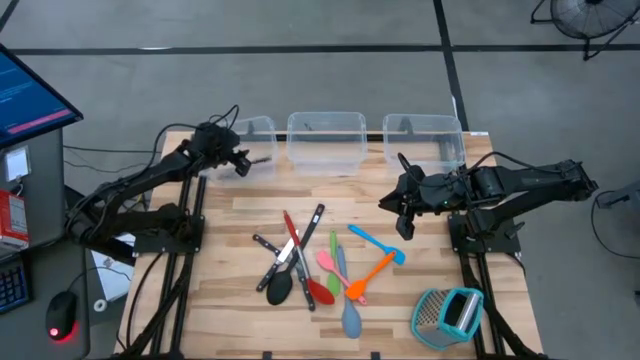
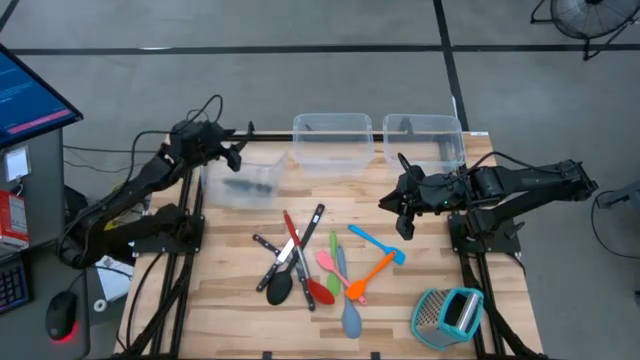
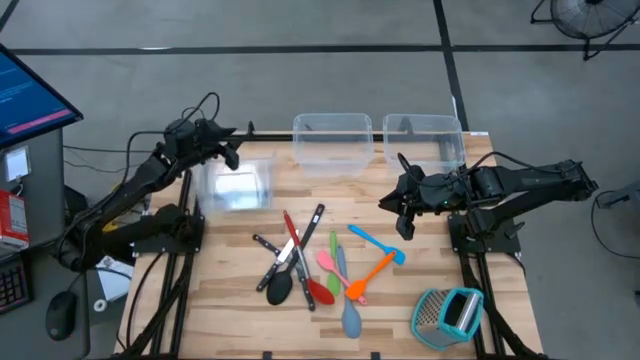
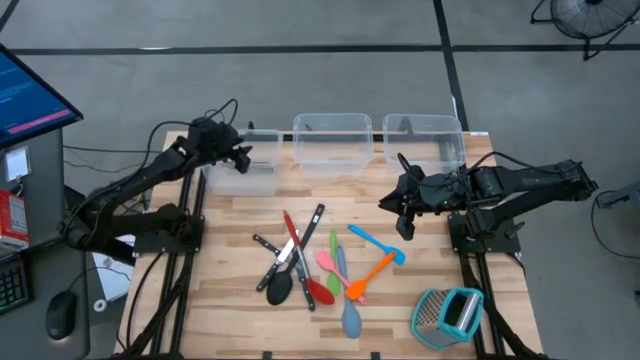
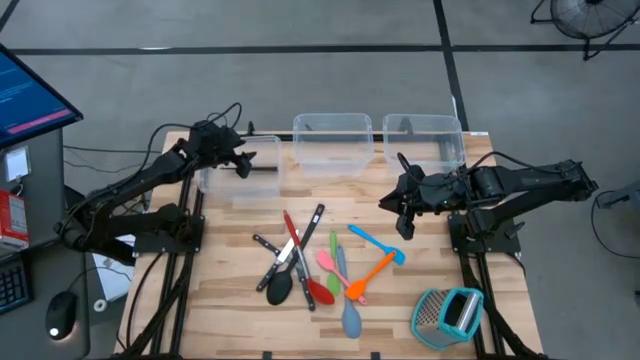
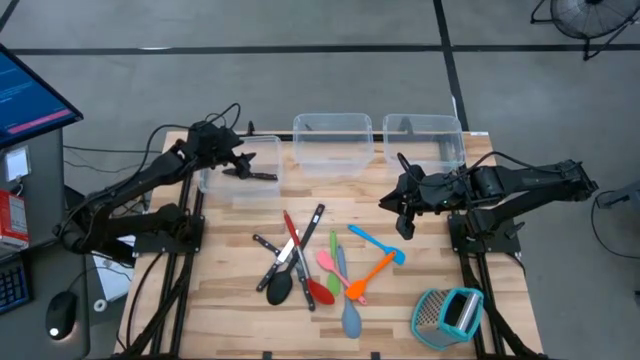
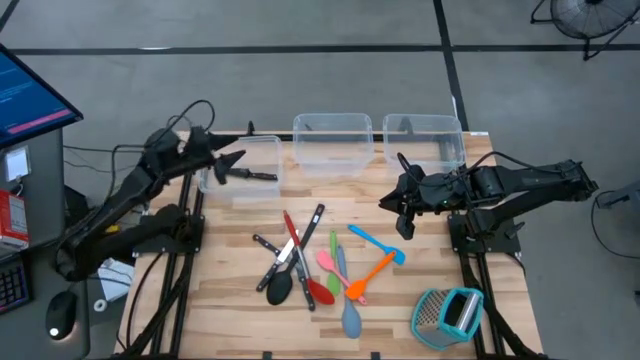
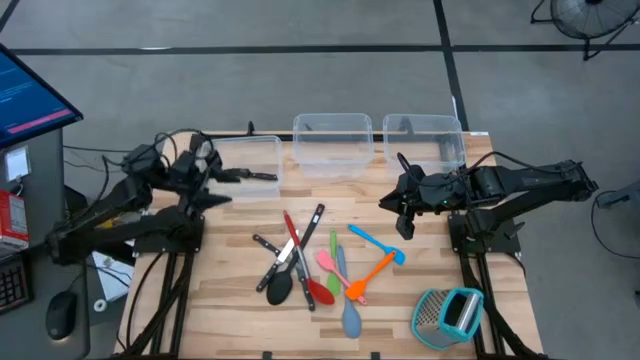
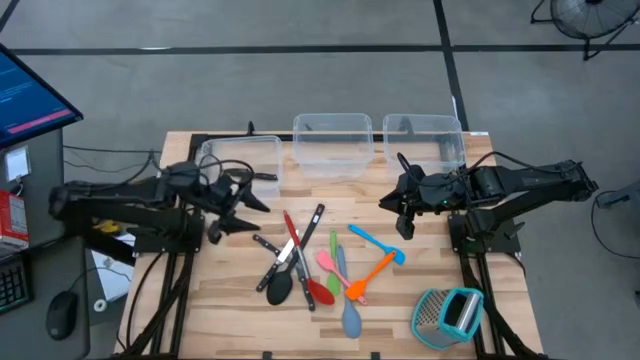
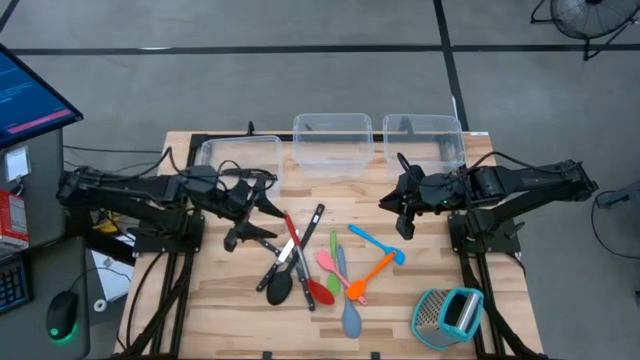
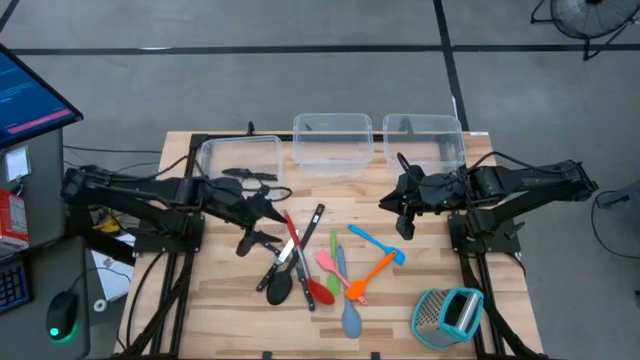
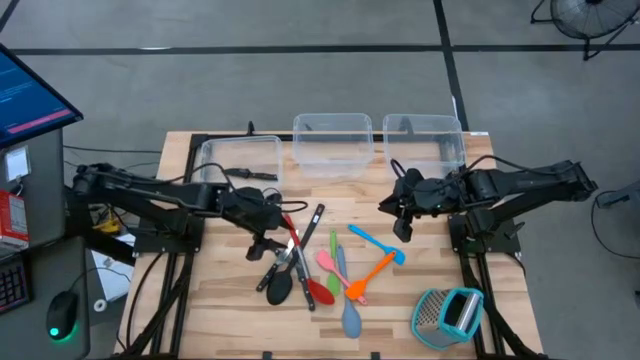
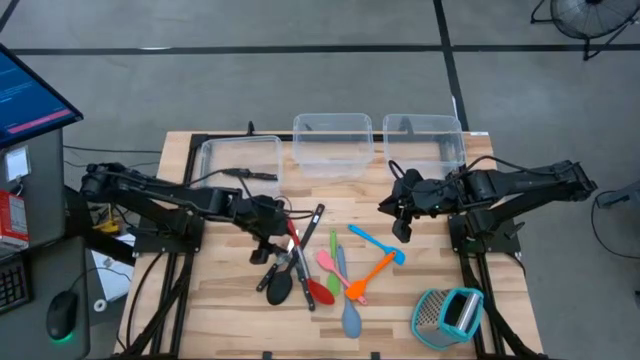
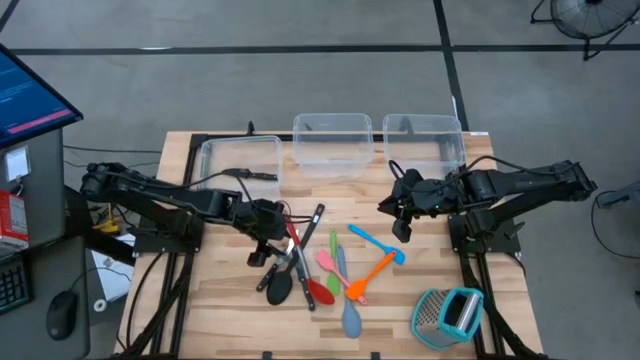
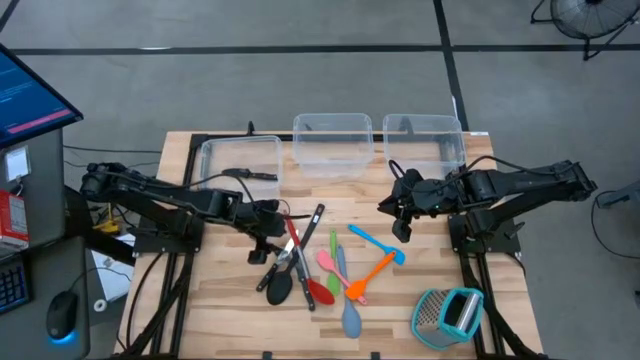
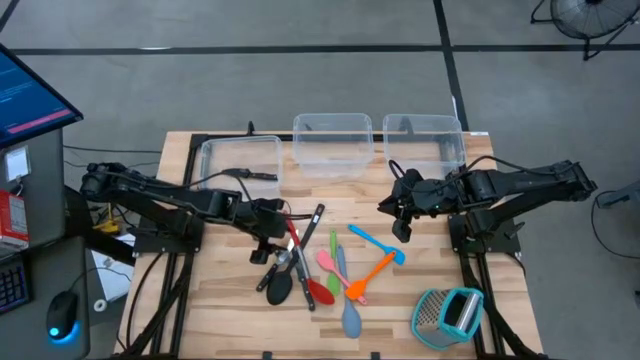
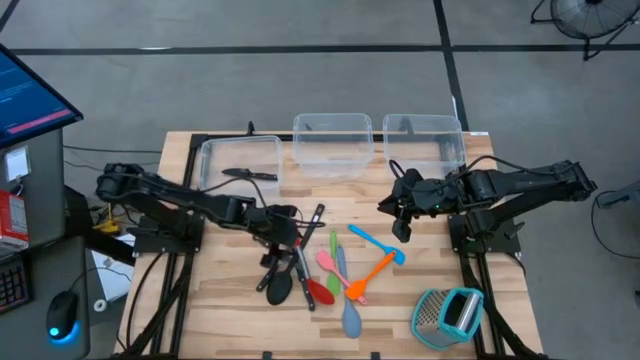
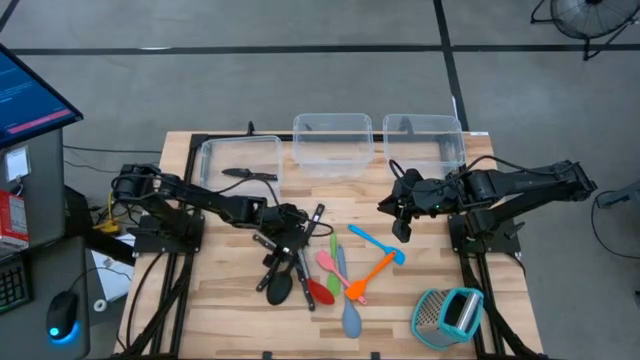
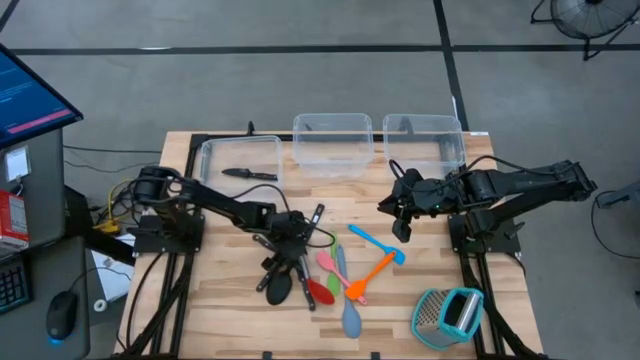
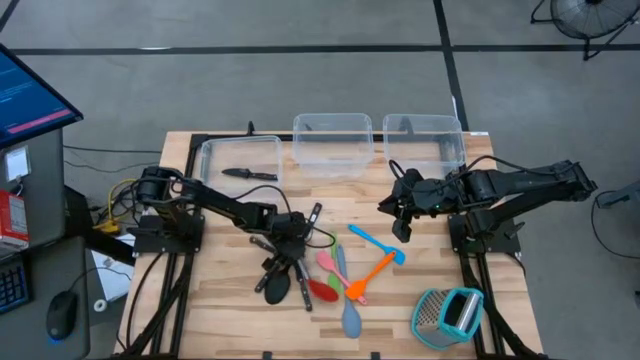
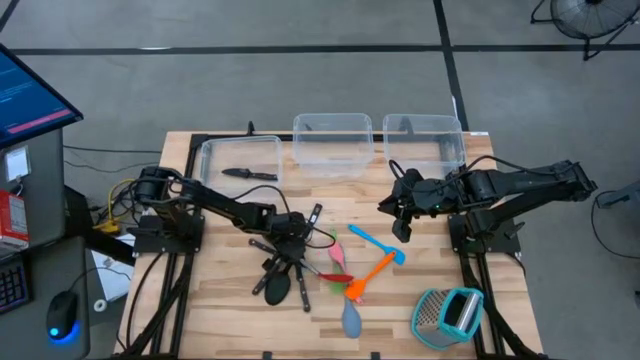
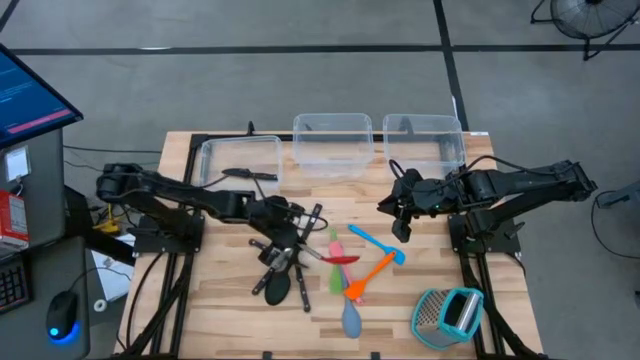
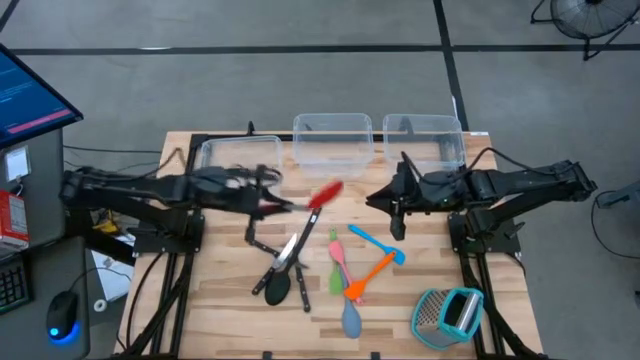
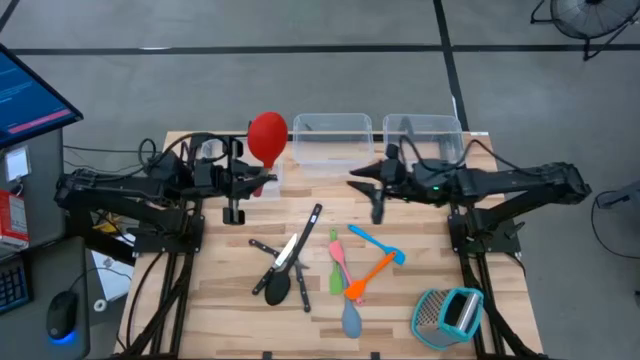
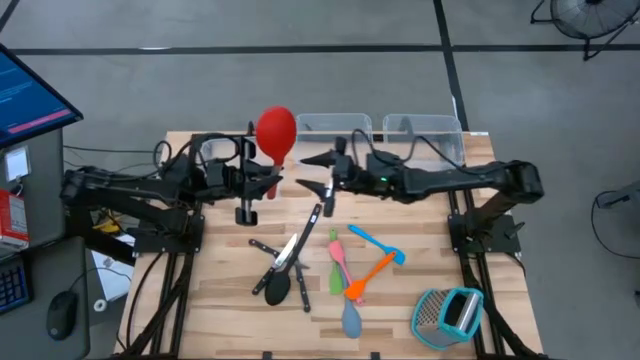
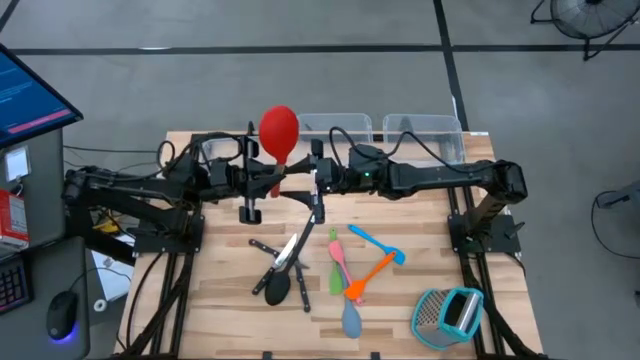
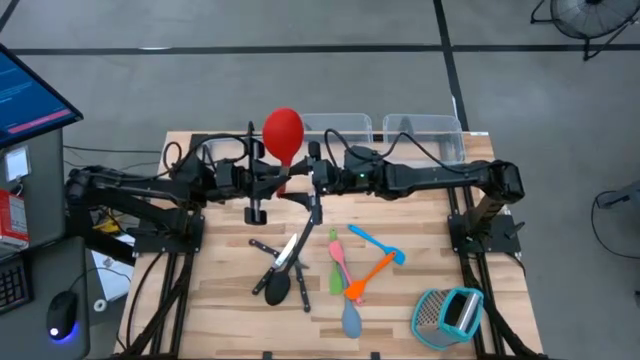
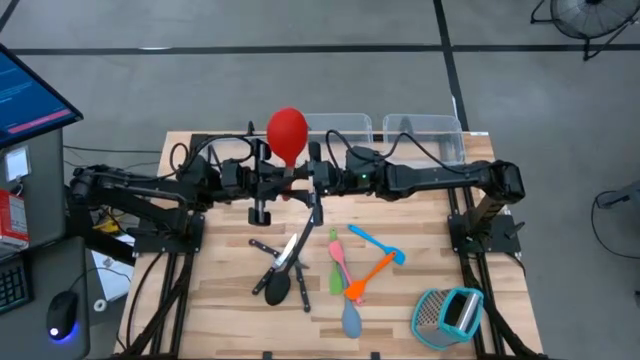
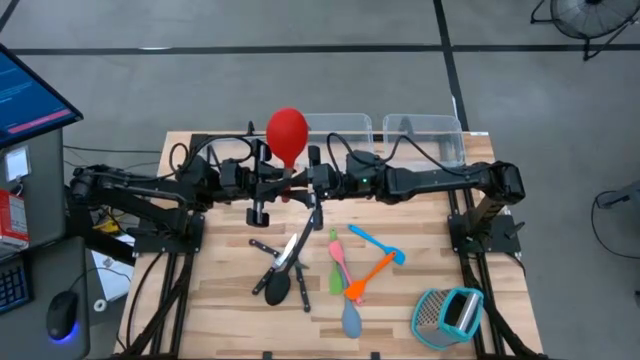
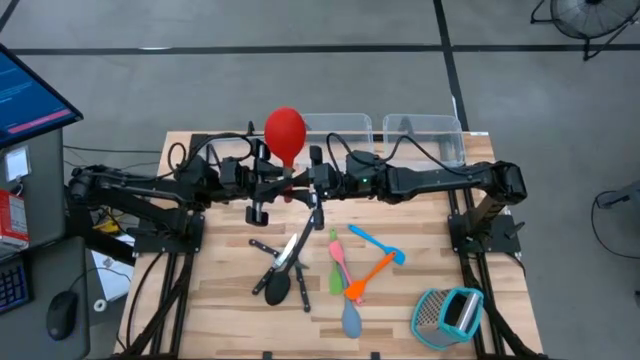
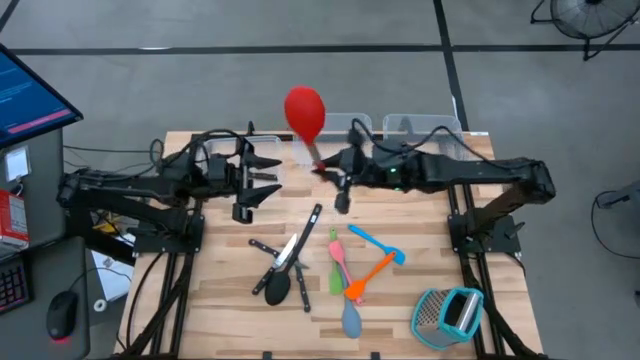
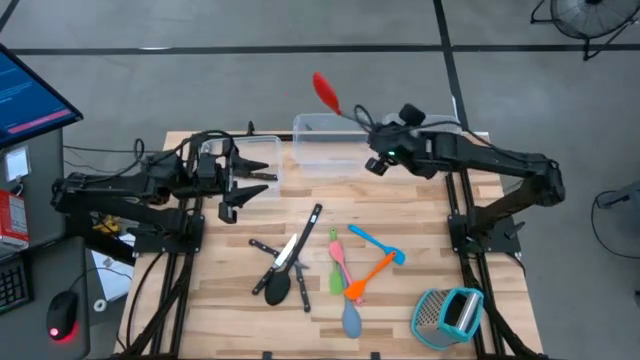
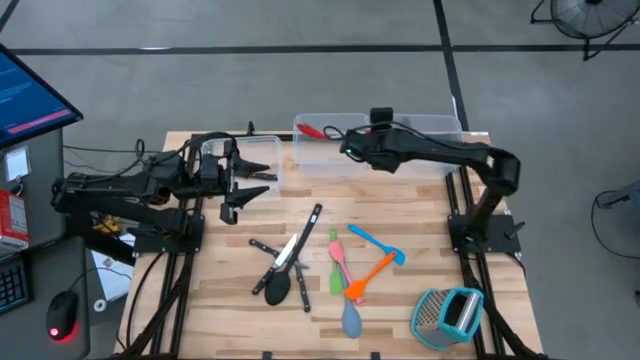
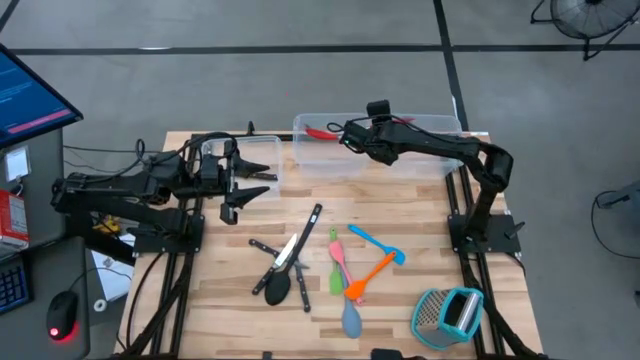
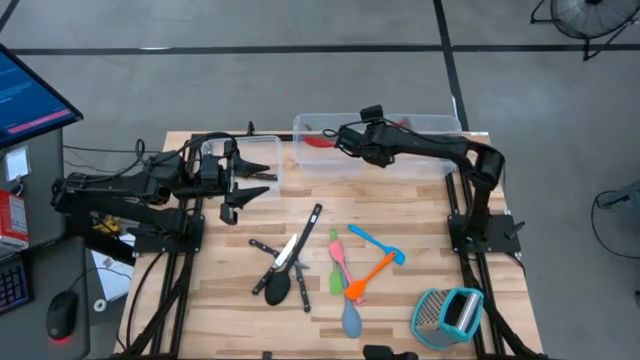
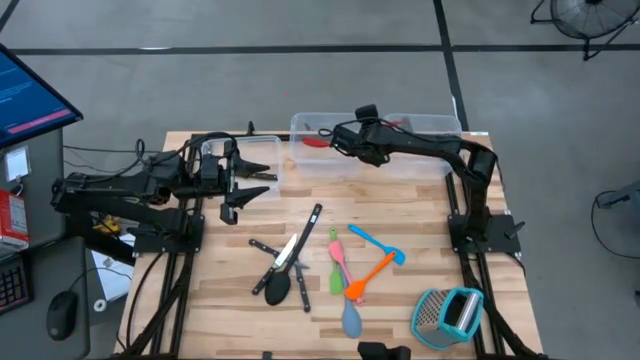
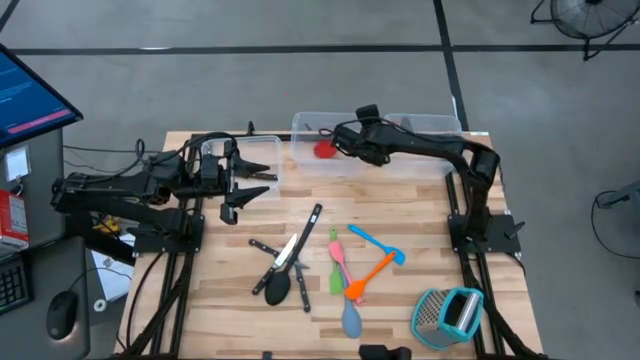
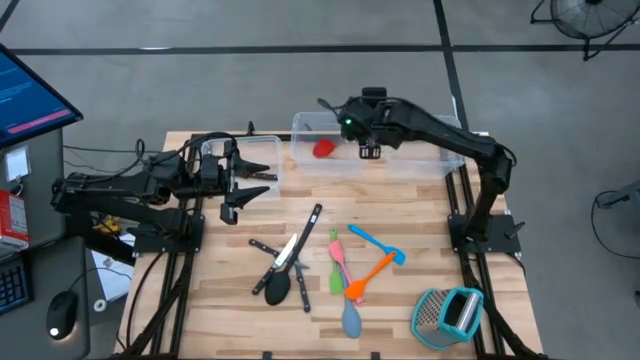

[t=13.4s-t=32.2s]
Task: Pick & Place Kitchen Items
Put the red serving spoon into the top middle transparent bin

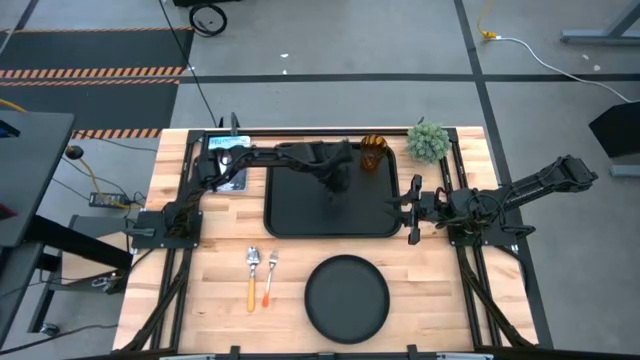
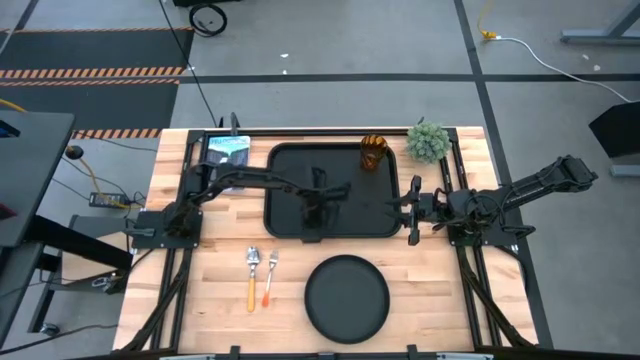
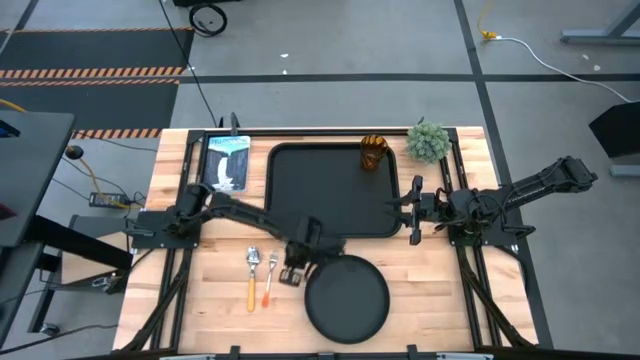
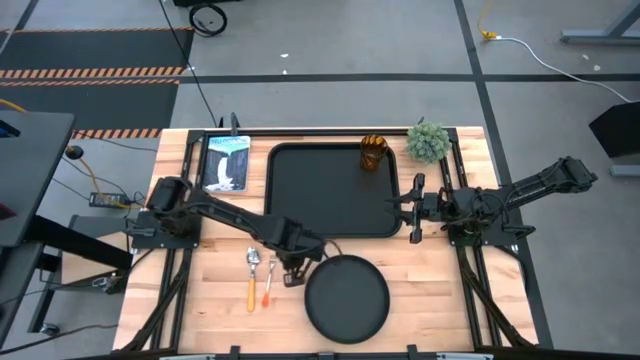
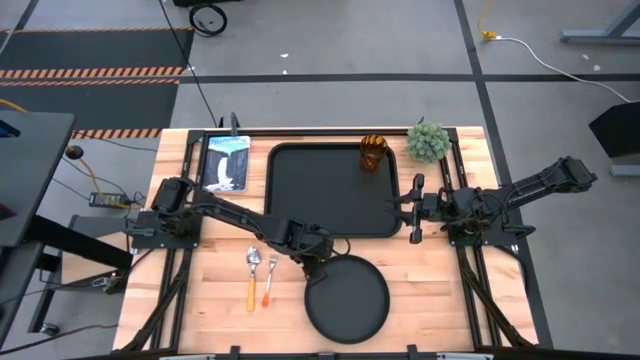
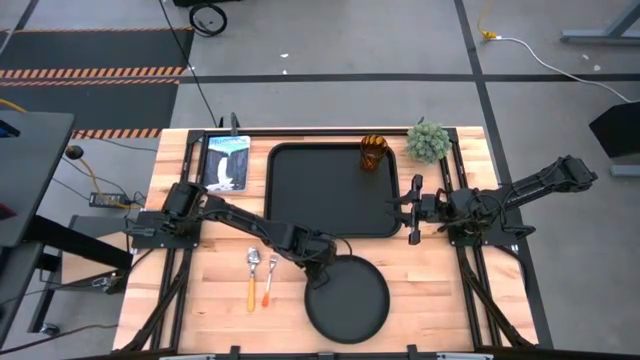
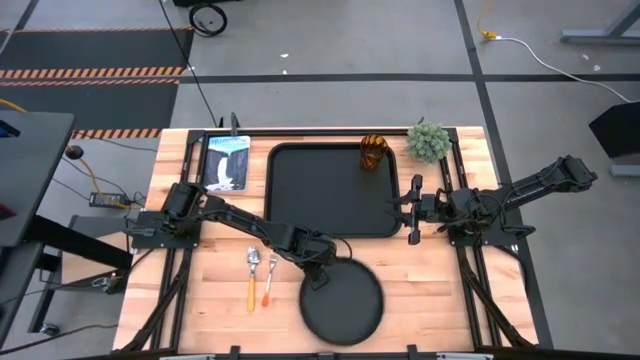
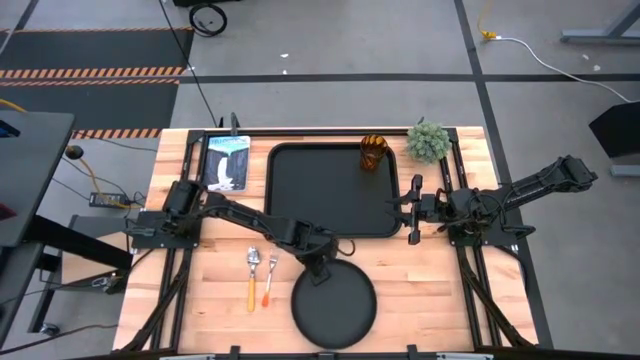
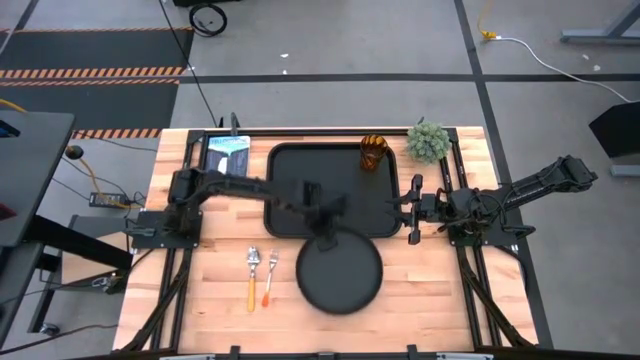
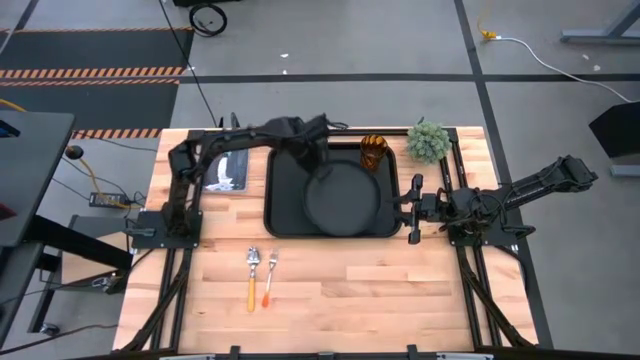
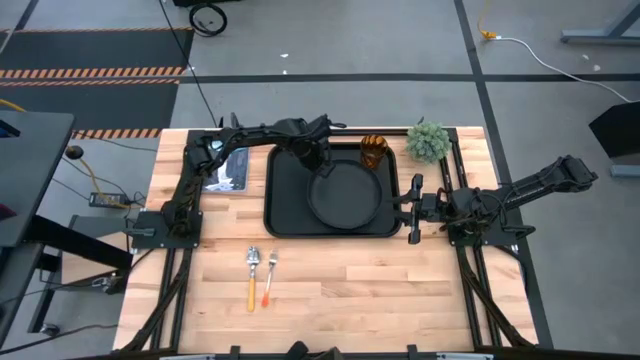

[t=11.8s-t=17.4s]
Task: Pick and place plate/cup/fork/spoon on tray
Put the black plate on the black serving tray
